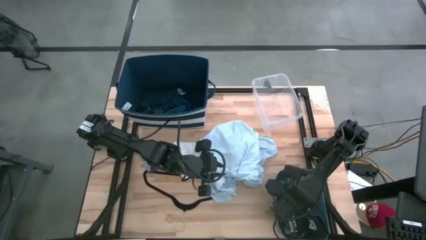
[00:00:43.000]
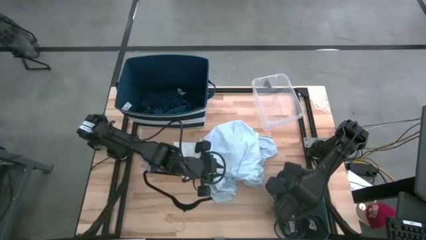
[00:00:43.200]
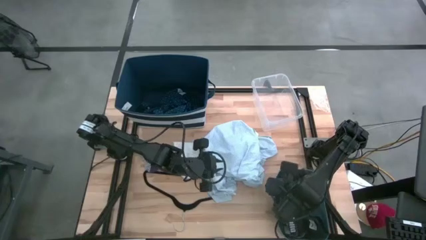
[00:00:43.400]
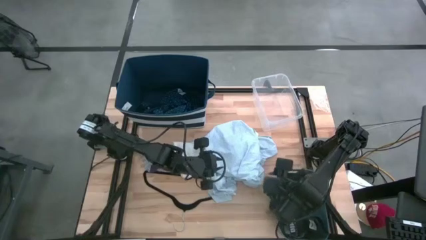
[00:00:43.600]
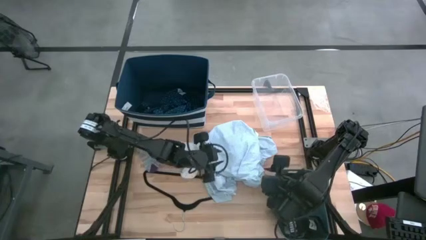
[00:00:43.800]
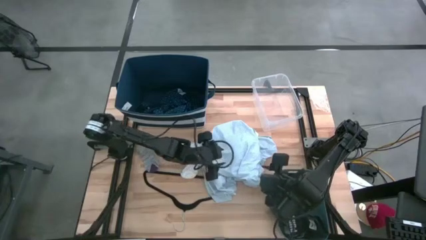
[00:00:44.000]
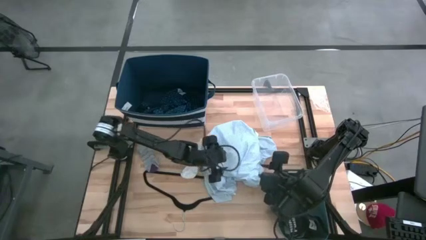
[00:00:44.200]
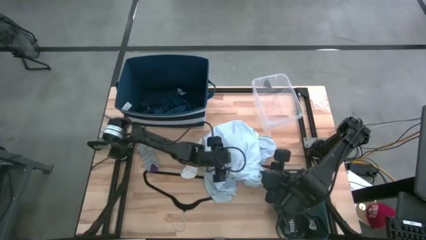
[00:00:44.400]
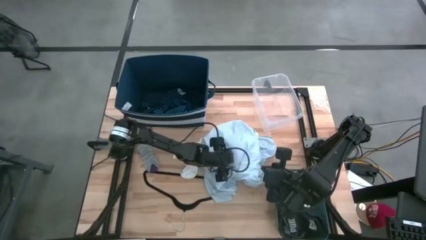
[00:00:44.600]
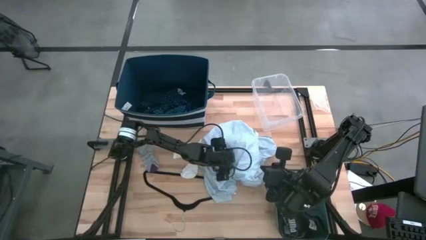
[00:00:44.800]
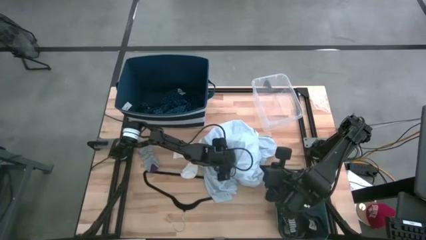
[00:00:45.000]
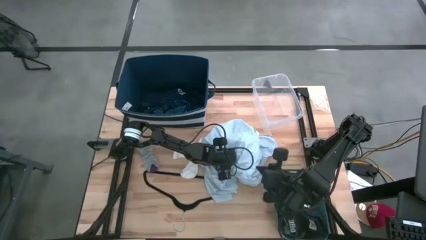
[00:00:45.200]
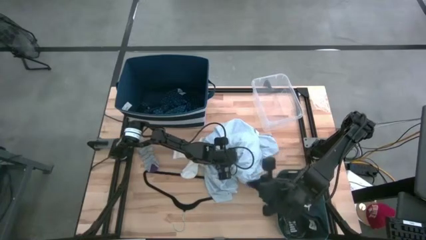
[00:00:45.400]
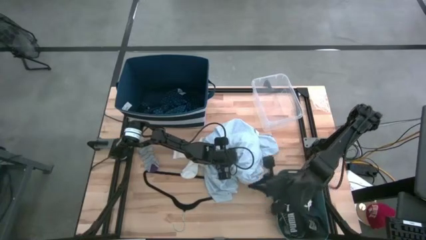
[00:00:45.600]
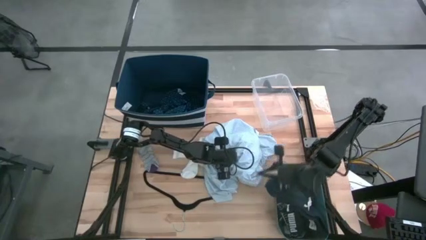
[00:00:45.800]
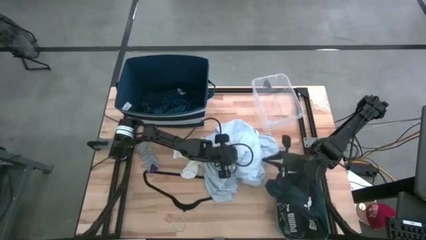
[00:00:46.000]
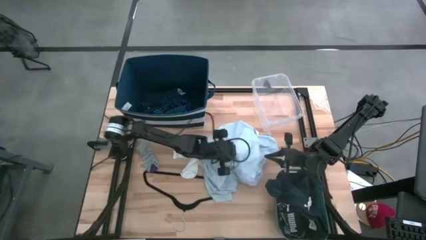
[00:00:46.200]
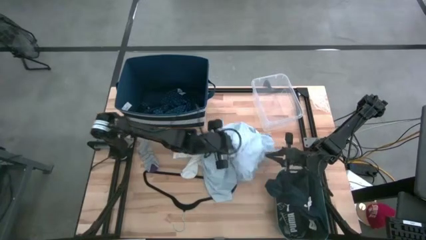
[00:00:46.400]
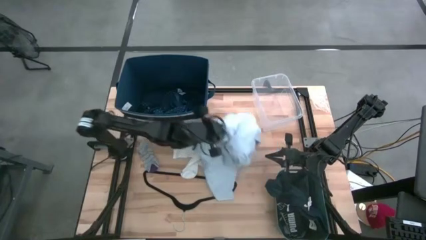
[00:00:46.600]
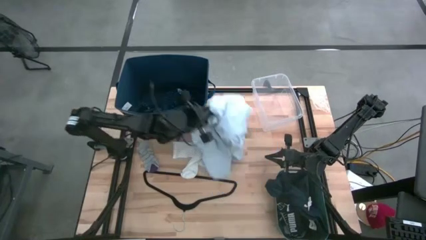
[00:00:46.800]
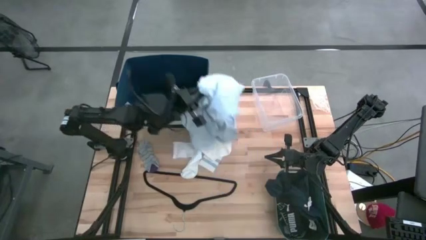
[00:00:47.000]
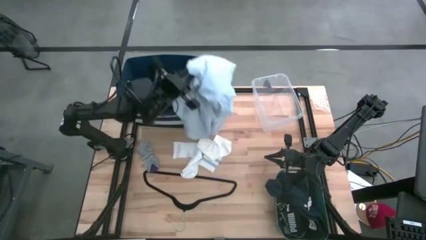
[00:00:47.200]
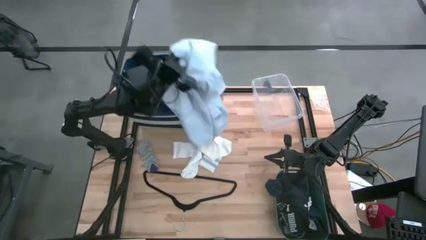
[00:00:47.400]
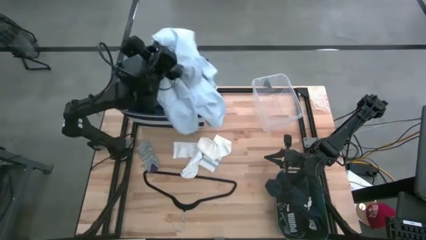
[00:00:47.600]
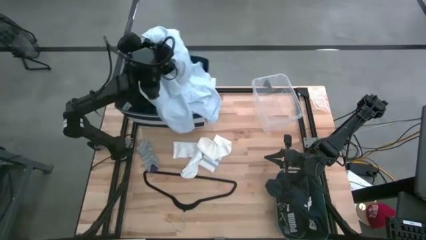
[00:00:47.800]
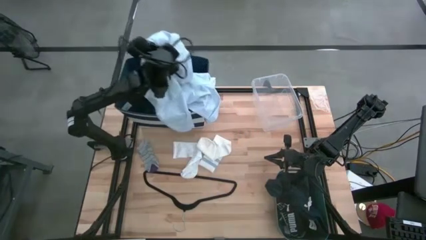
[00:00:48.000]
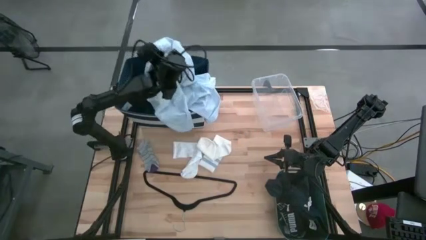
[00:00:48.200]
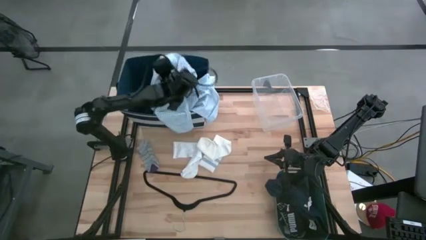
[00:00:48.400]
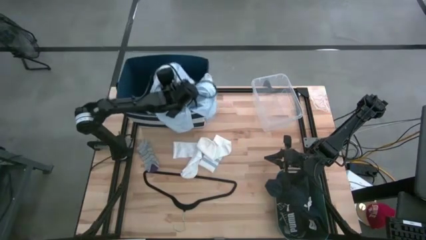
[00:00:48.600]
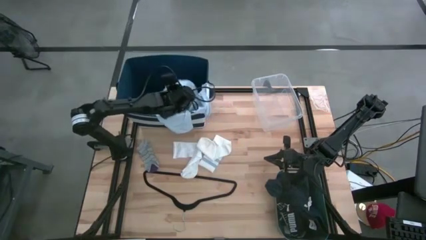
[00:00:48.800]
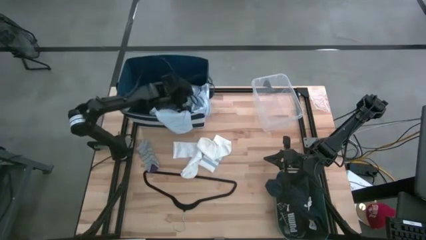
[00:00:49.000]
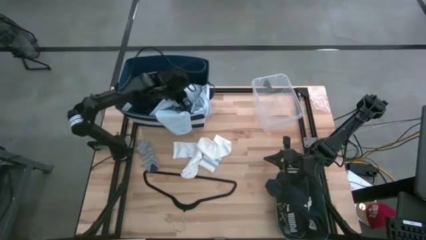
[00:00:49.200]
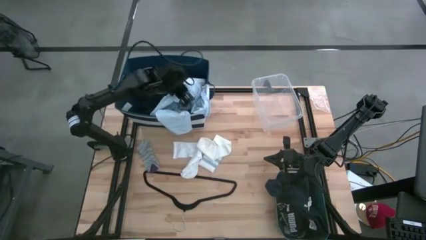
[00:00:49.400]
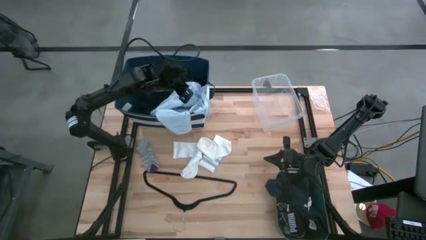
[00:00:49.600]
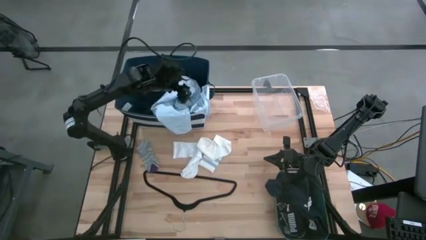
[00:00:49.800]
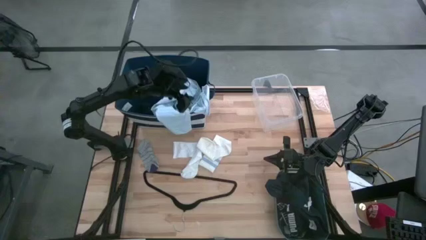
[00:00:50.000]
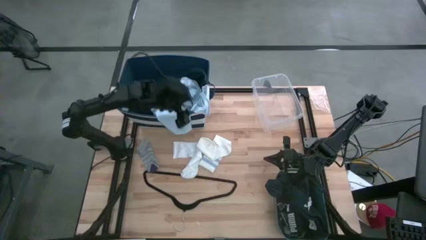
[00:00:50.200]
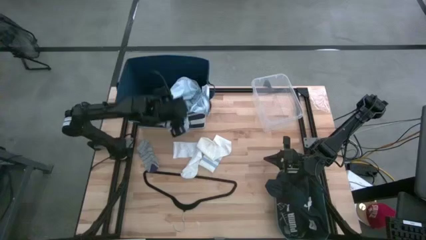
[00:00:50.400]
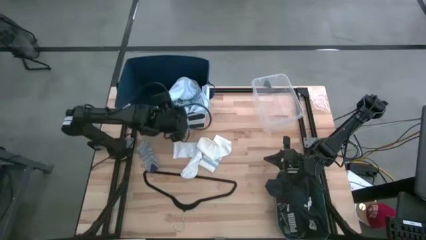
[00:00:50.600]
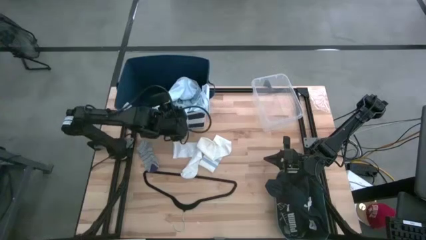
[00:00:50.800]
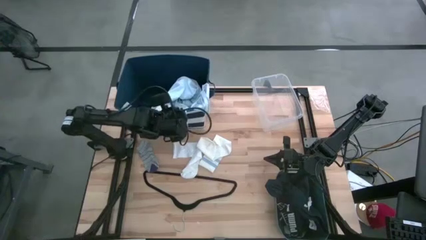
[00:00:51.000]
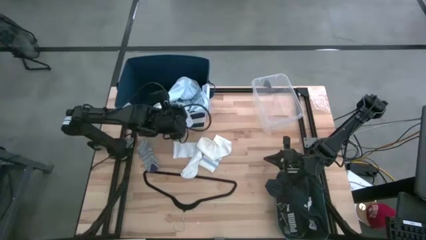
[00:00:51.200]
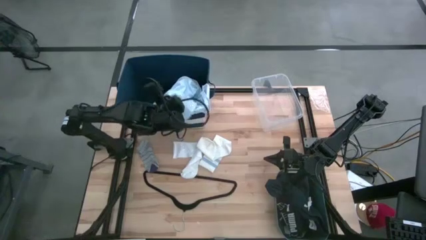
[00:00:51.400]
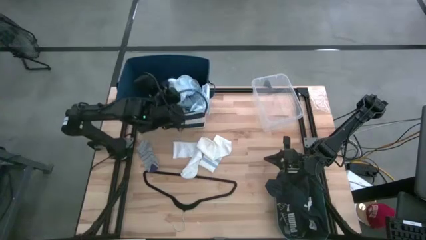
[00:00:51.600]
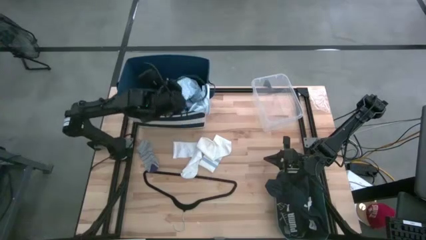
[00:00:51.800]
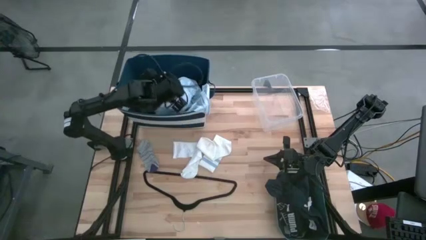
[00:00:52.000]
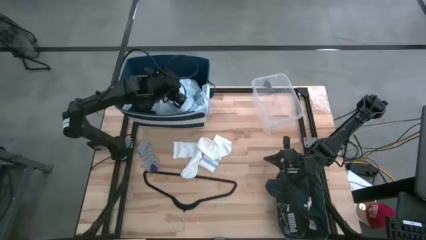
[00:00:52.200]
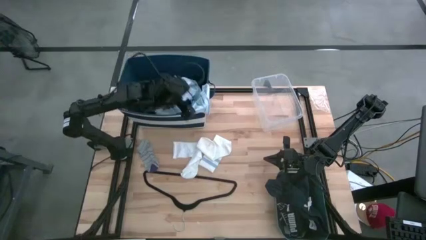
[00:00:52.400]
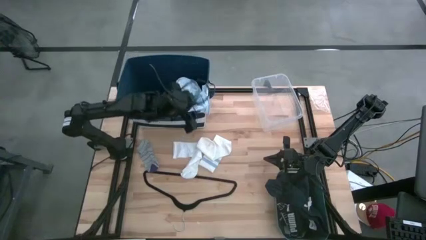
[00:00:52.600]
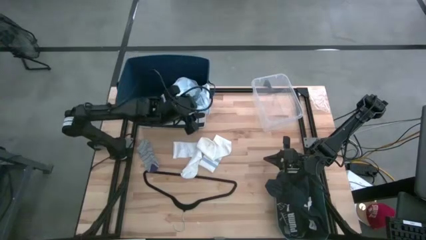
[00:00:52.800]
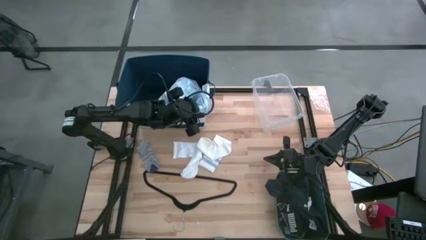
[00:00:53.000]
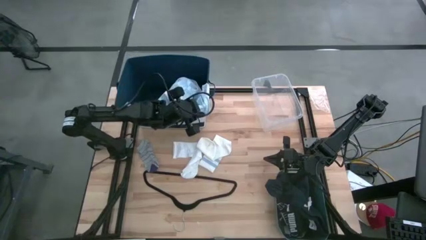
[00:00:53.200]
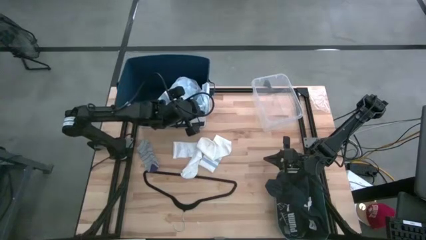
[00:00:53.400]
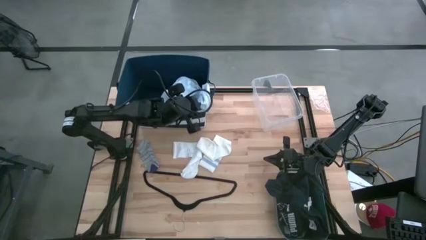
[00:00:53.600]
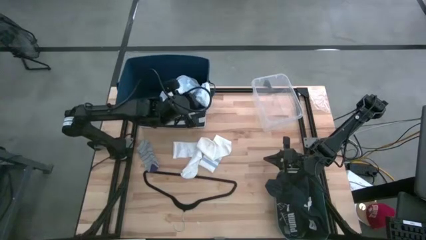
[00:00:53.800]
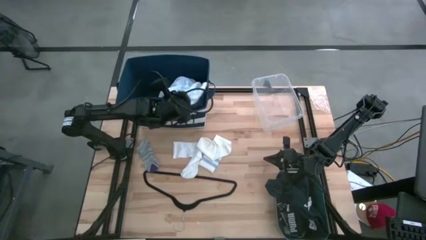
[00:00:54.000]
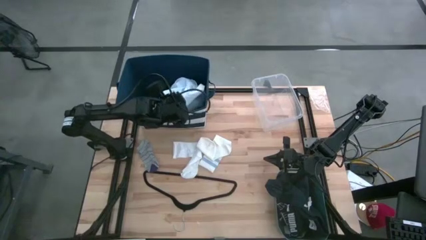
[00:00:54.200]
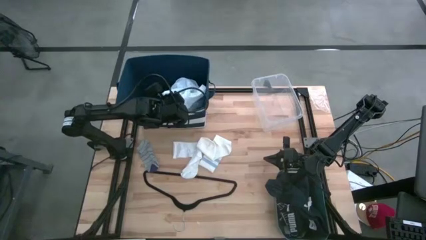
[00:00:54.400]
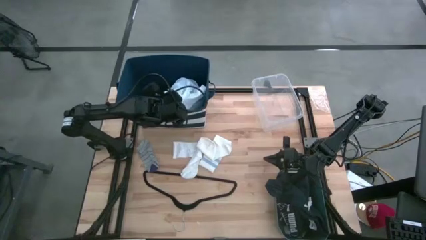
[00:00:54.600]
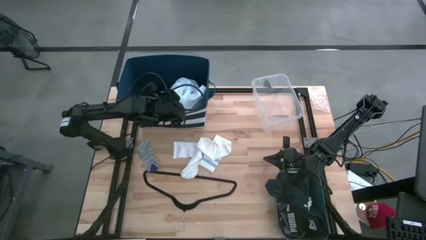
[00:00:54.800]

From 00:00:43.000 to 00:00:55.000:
Task: Pick & Place Cloths
Put the white shirt into the laundry organizer

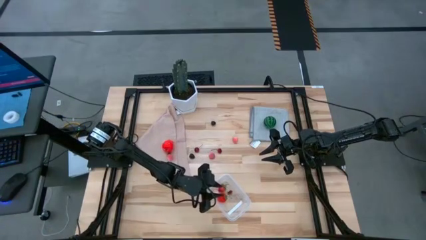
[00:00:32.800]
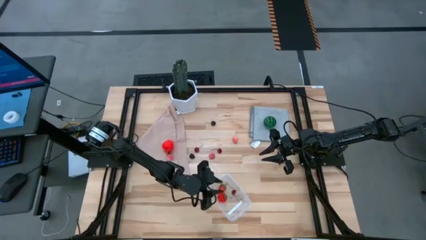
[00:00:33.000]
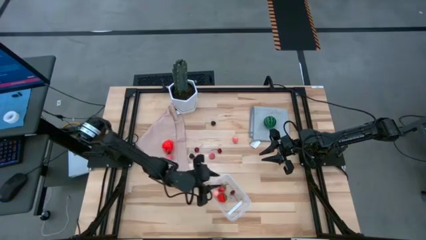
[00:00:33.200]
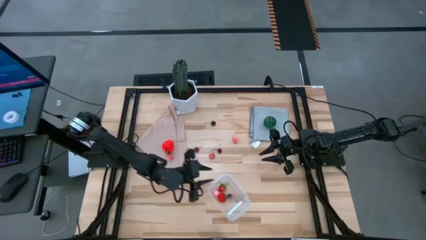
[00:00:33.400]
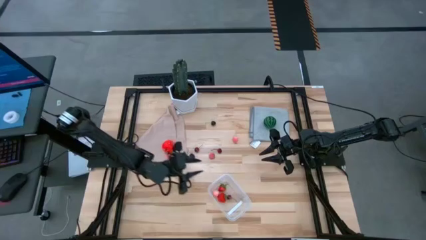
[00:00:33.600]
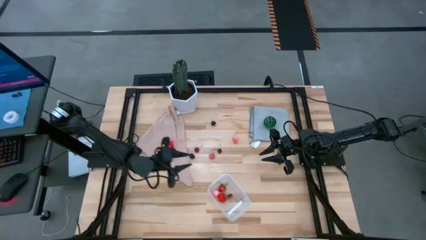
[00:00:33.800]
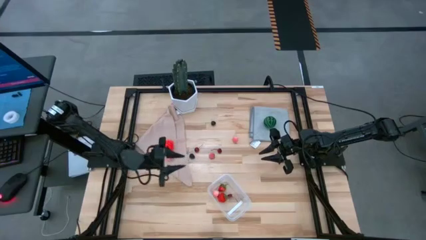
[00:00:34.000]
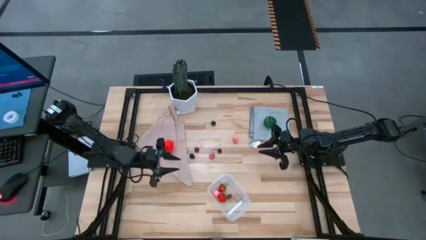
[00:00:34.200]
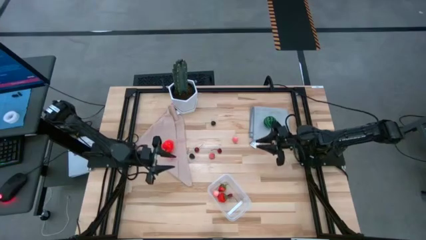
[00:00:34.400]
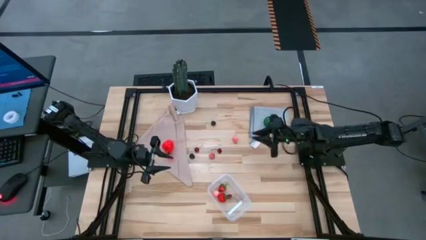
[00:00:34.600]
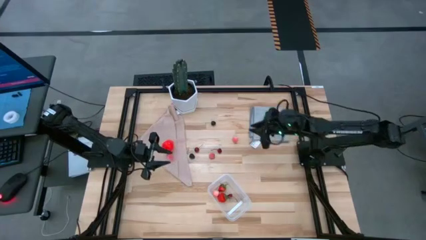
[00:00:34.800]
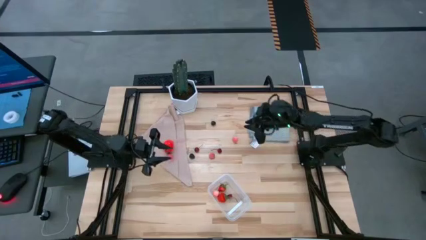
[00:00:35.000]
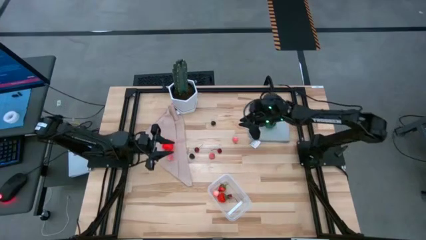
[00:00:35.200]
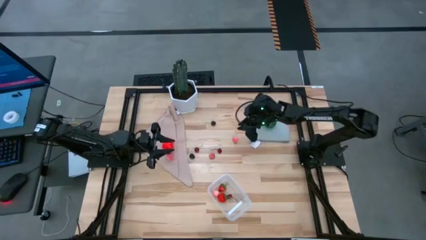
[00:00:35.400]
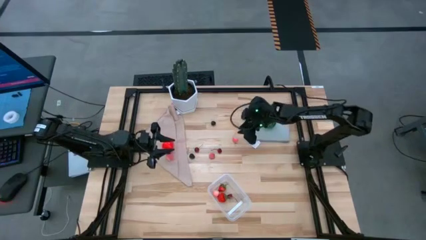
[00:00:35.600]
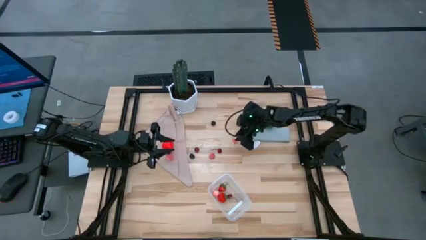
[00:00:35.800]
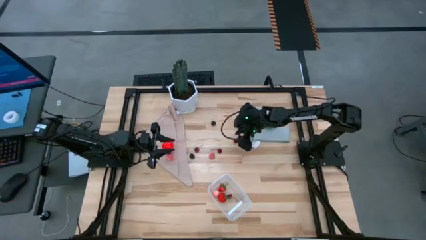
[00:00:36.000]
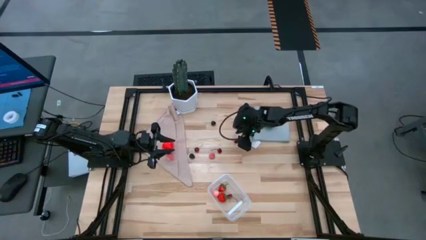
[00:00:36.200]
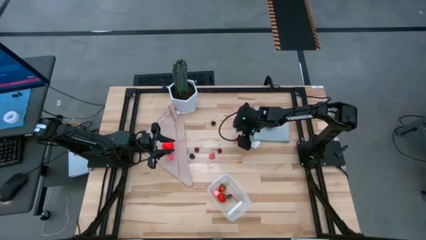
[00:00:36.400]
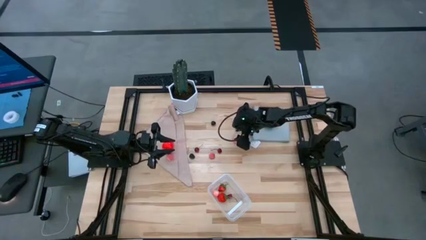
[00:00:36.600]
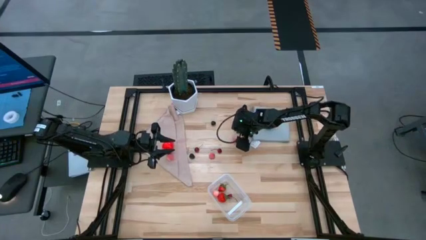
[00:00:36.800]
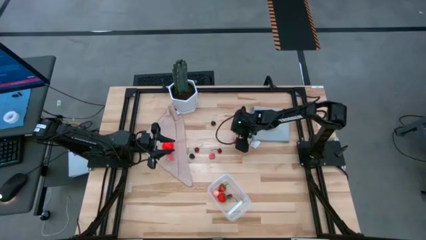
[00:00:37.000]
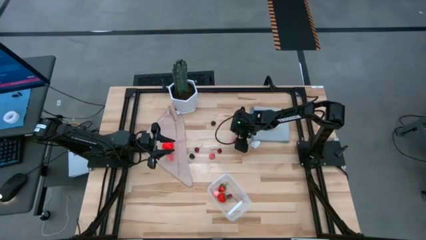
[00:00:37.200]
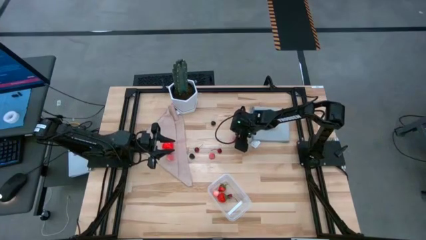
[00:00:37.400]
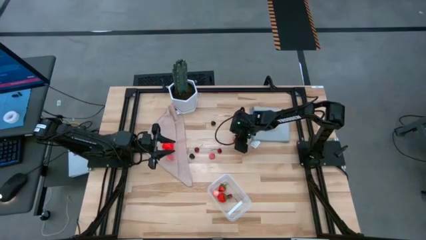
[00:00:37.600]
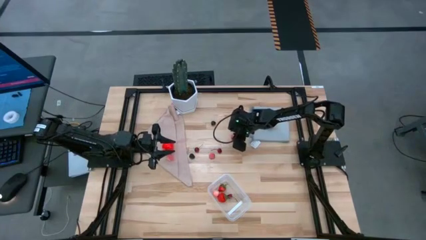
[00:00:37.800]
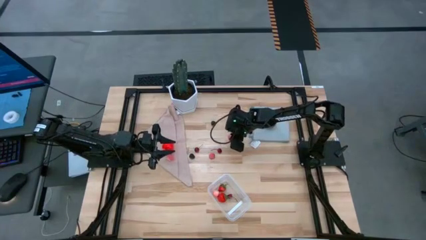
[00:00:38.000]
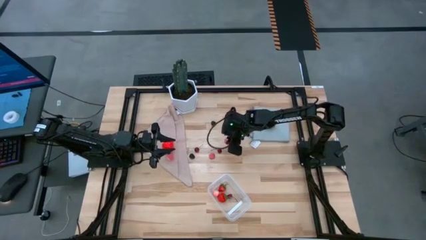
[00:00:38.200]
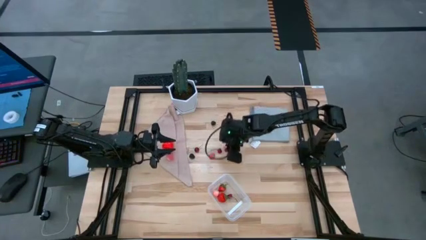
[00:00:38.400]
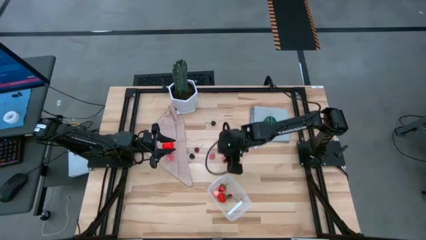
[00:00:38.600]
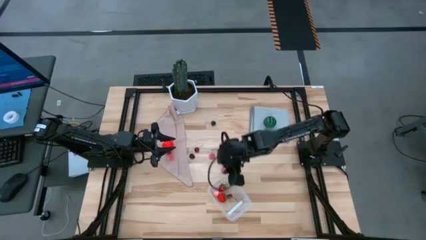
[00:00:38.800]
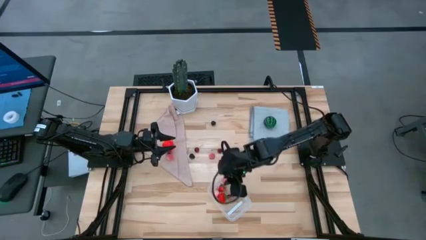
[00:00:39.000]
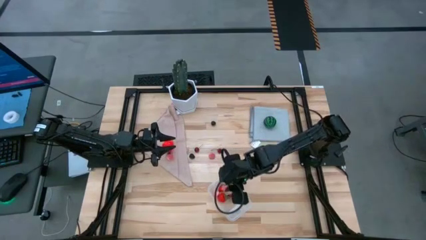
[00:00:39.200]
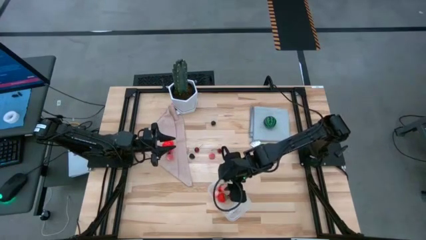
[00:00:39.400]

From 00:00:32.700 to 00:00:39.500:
Task: Pick and placing Produce into tupperware
Put the top peach into the transparent bin
